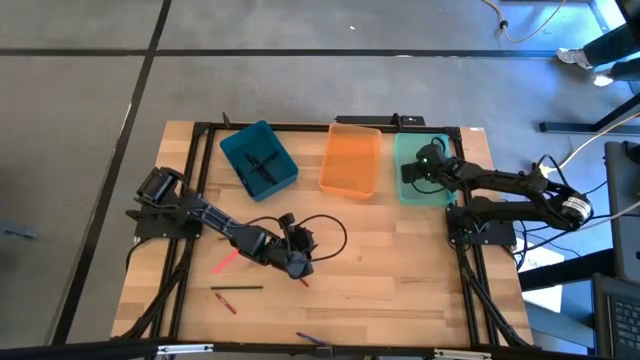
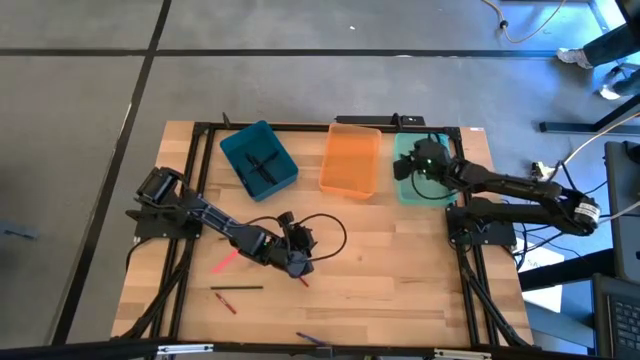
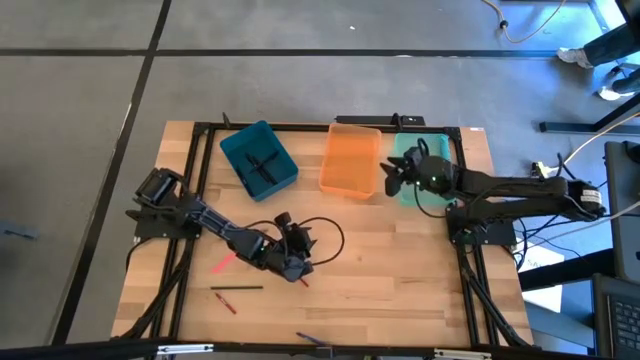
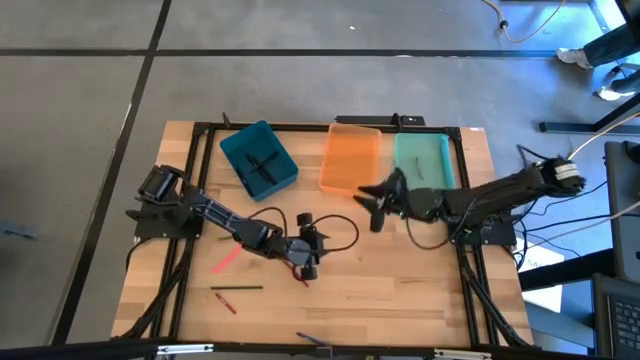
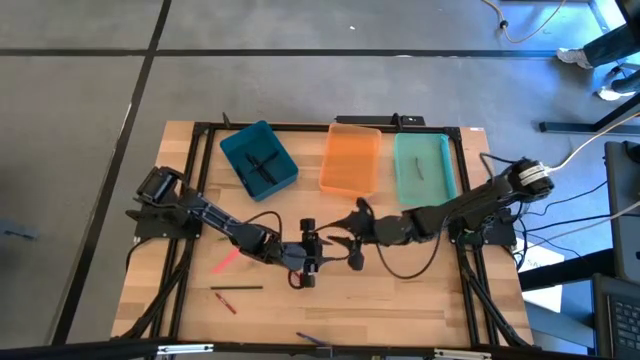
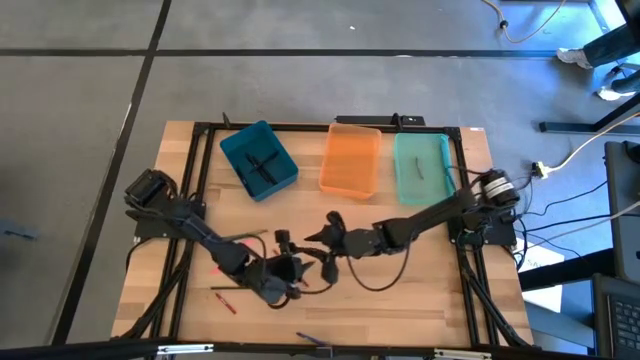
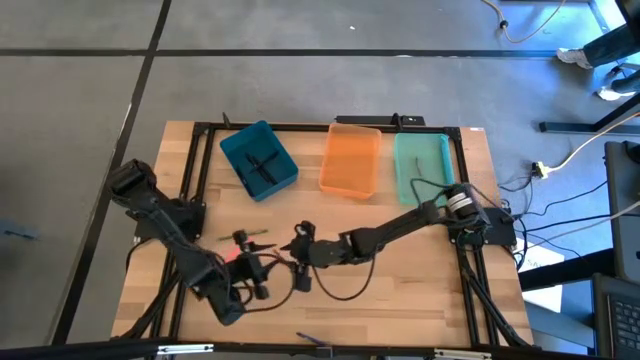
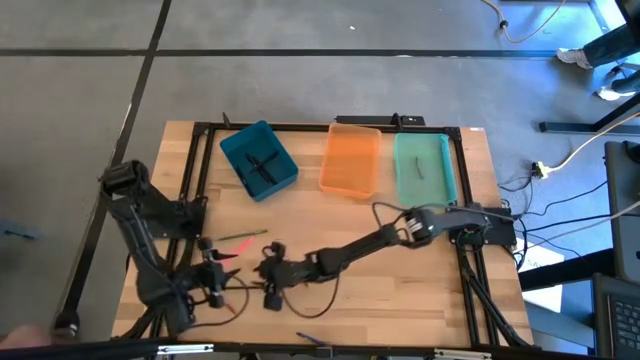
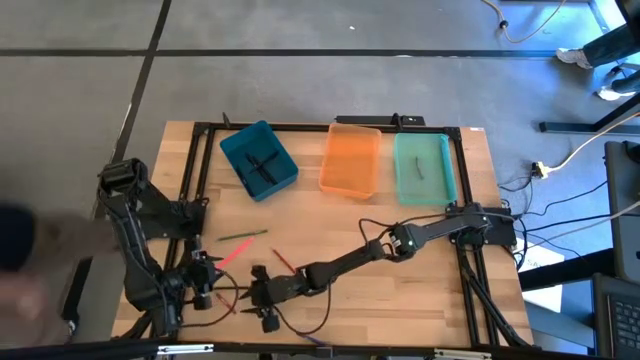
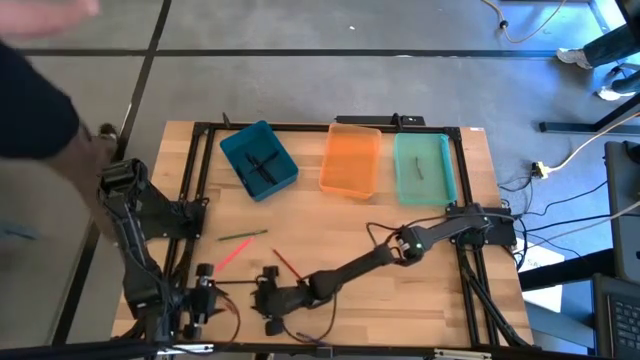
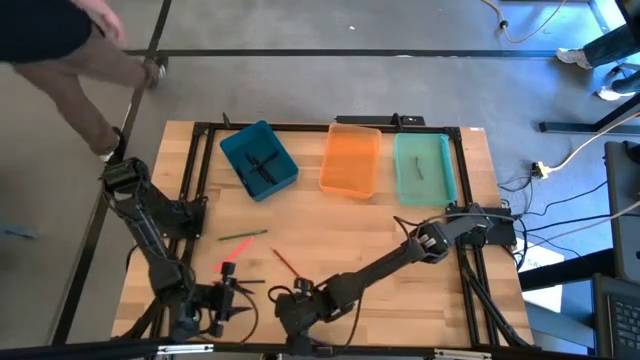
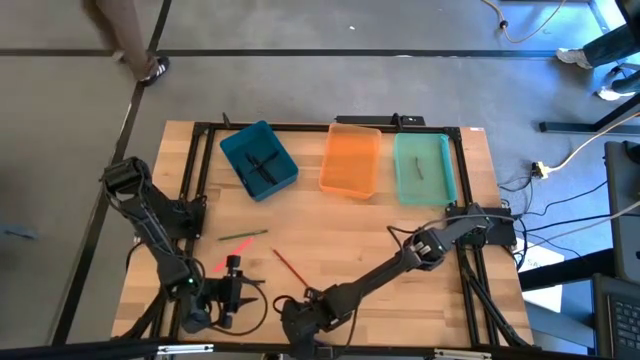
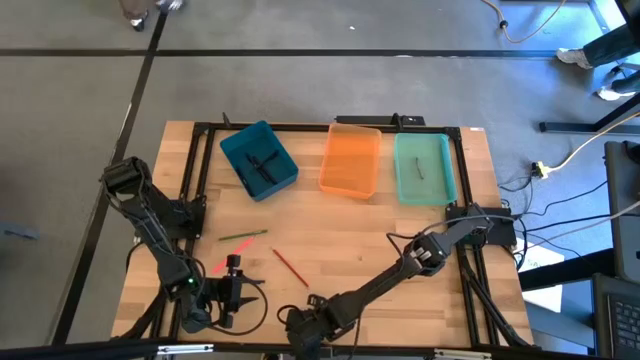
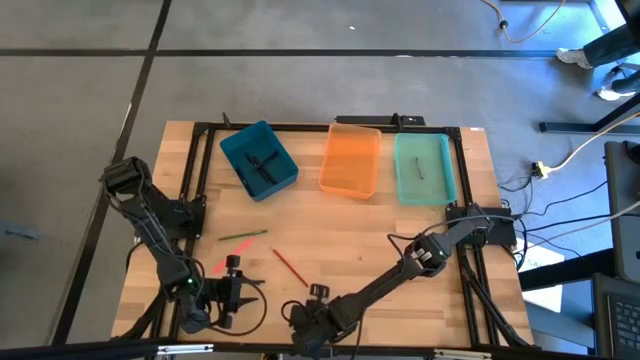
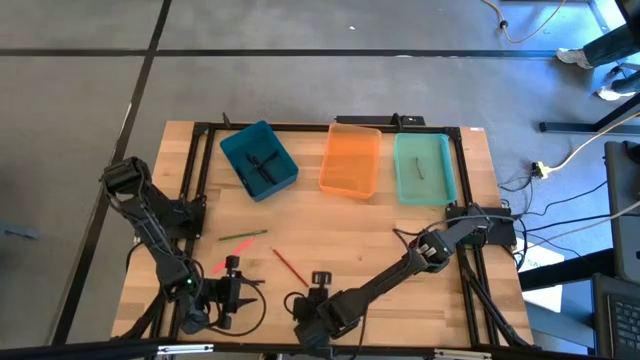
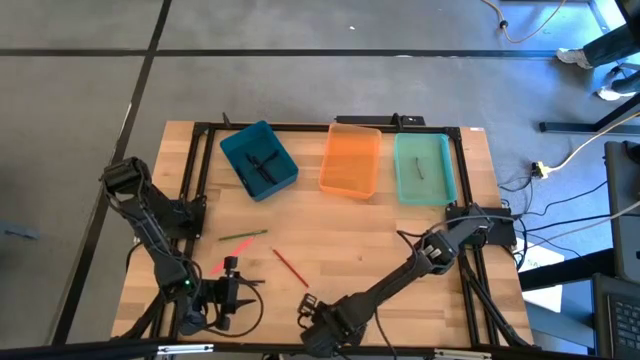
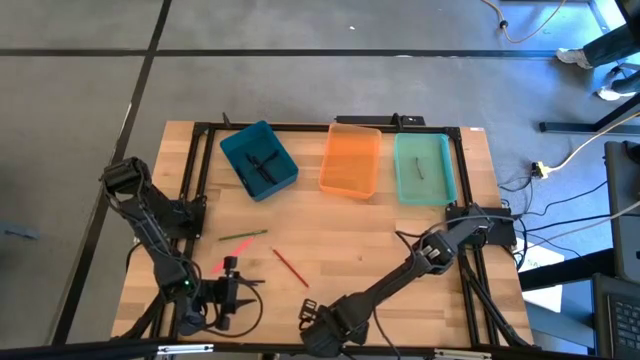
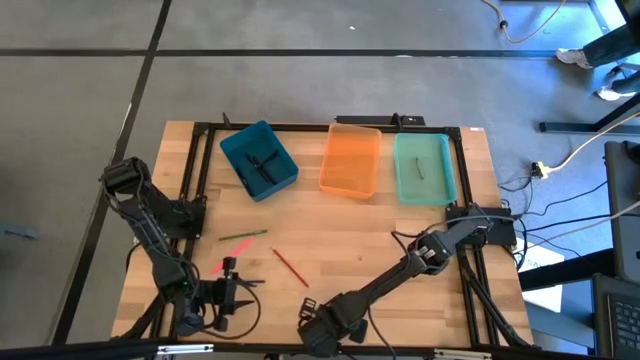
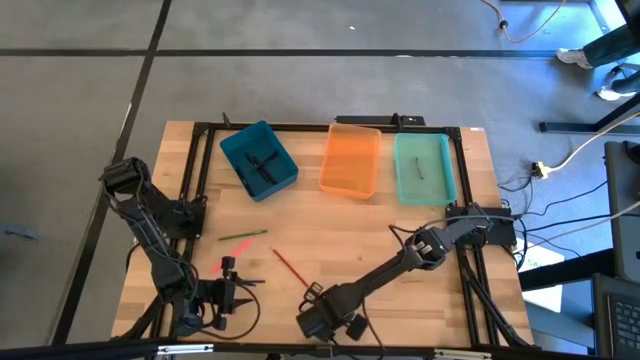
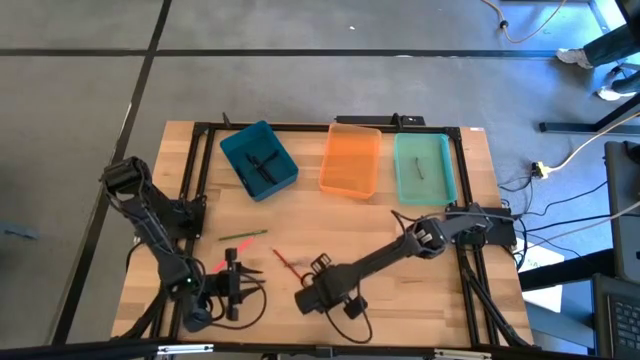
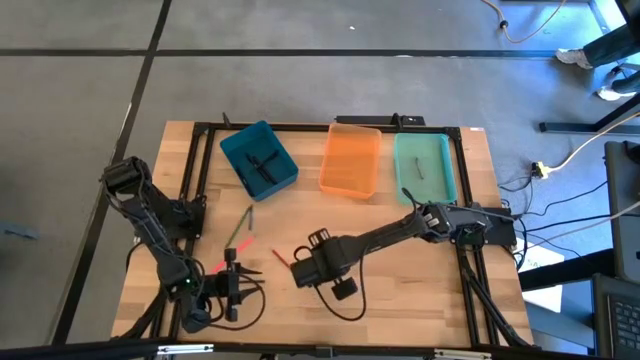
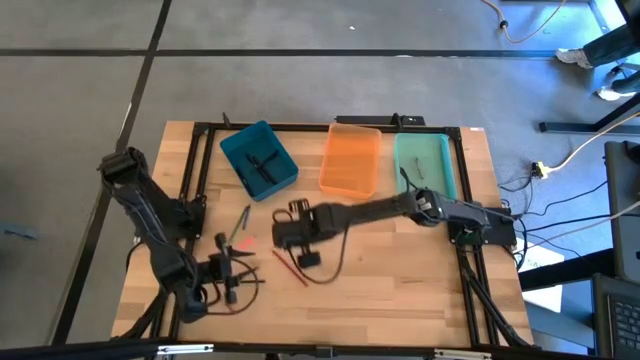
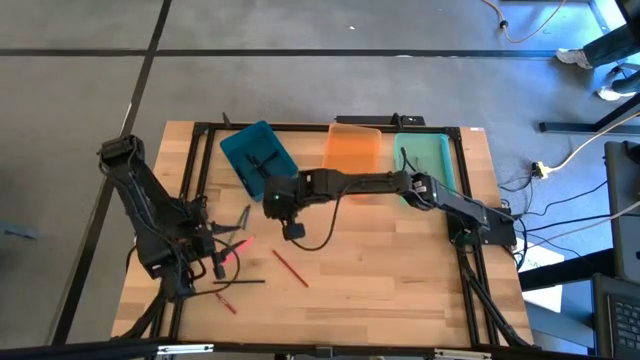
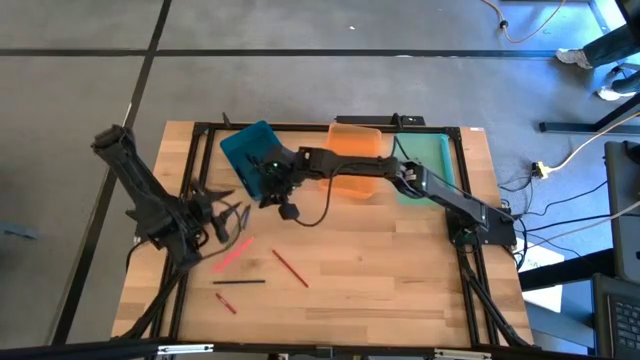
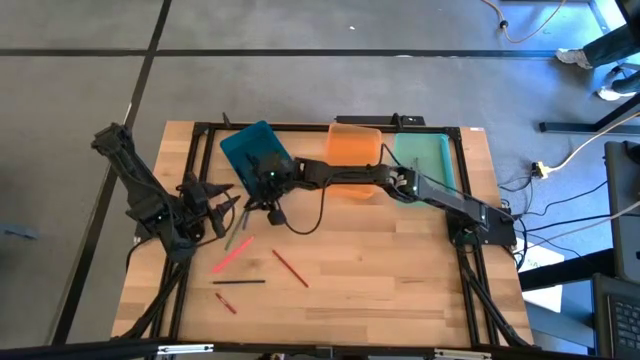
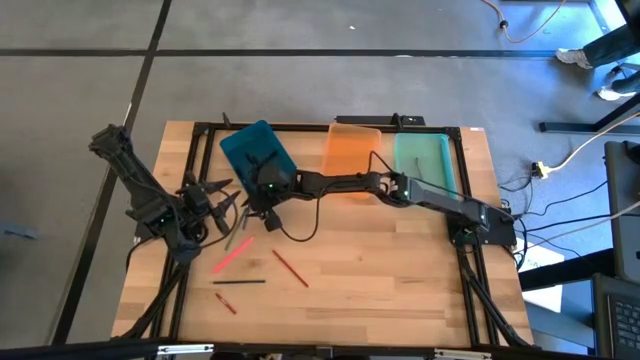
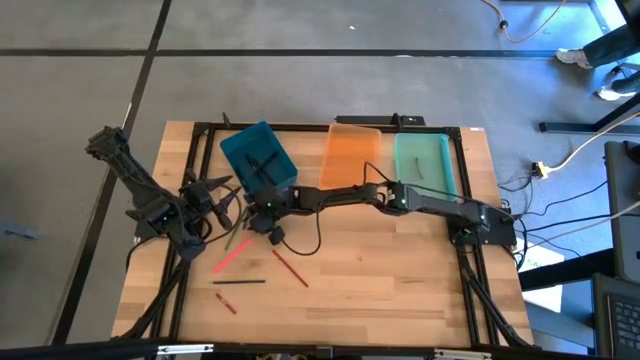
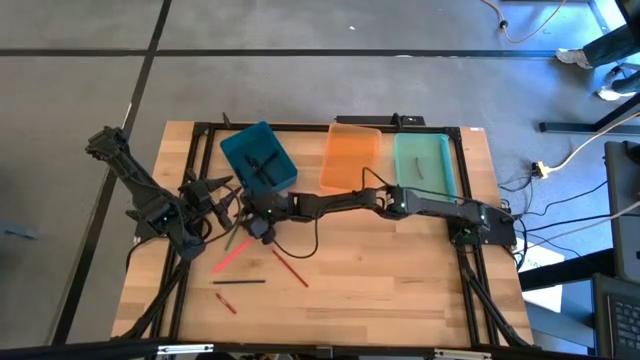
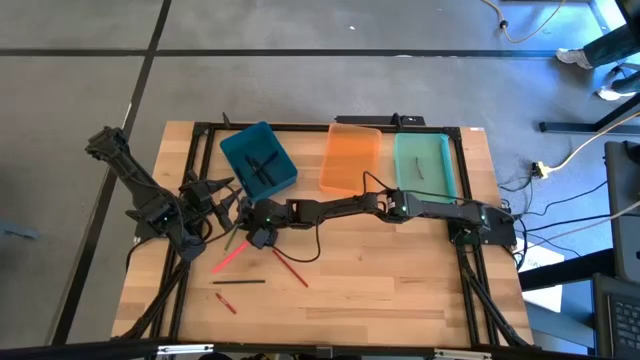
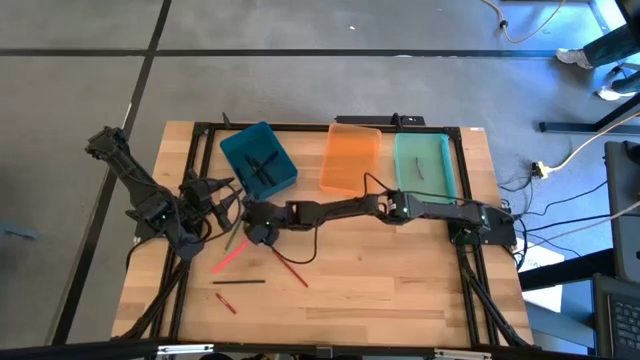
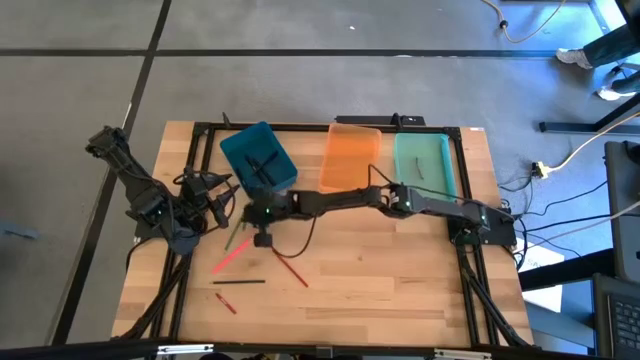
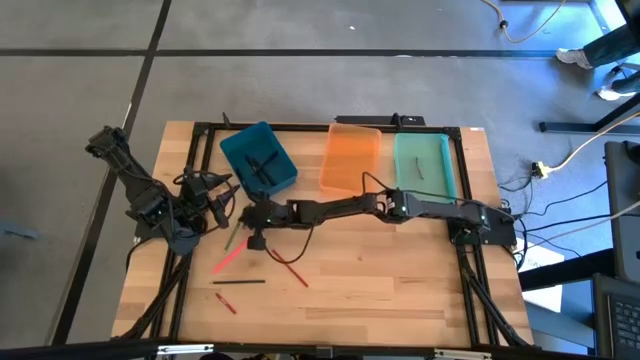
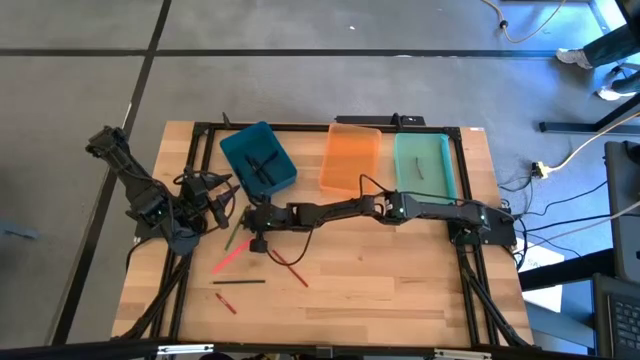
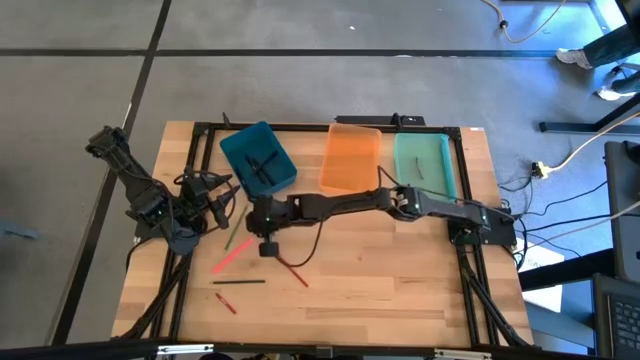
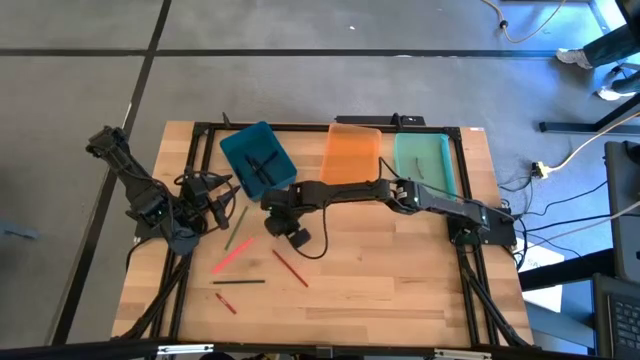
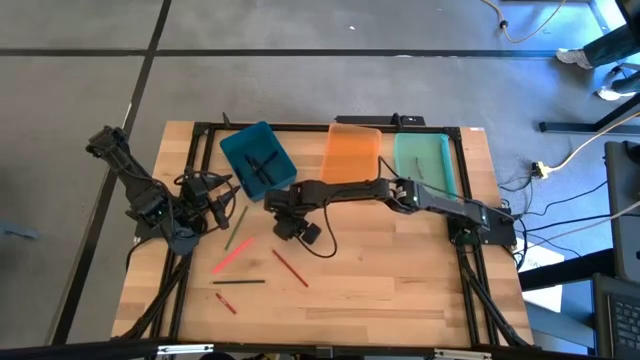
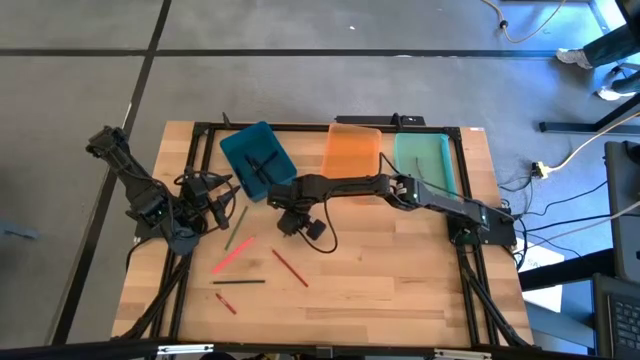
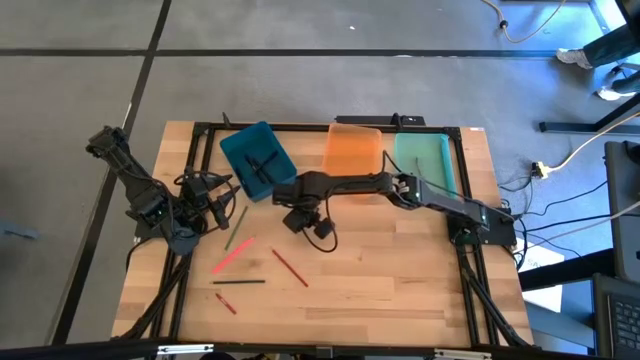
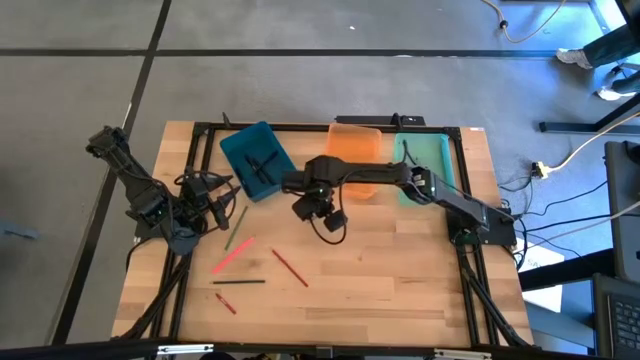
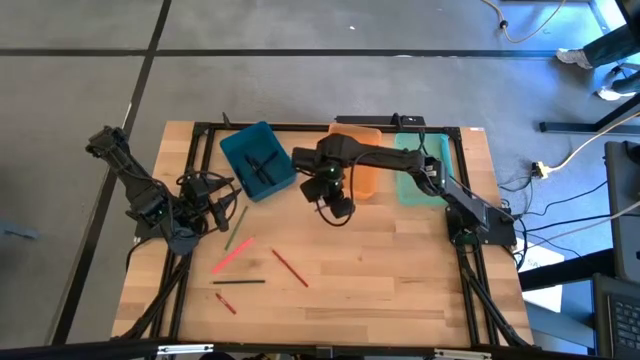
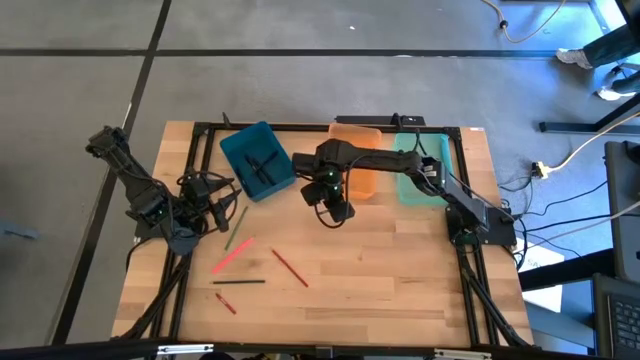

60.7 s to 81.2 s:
Task: Sort crayons/erasers/pens/pencils in bins
Put the blue crayon into the light blue bin
